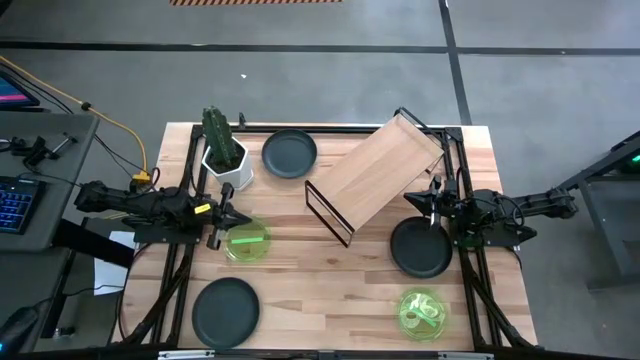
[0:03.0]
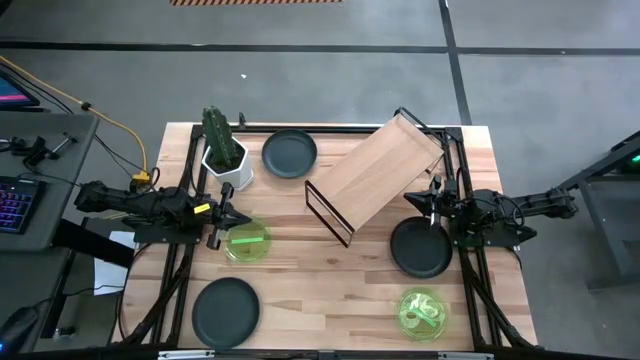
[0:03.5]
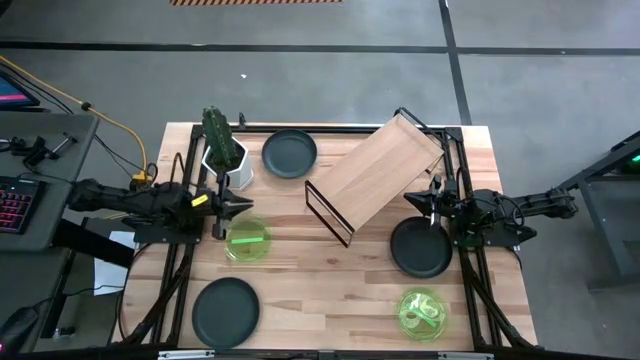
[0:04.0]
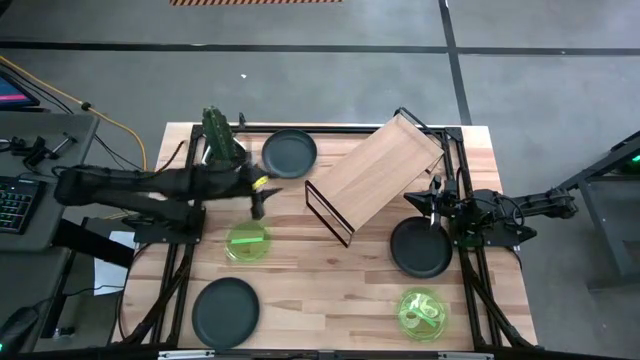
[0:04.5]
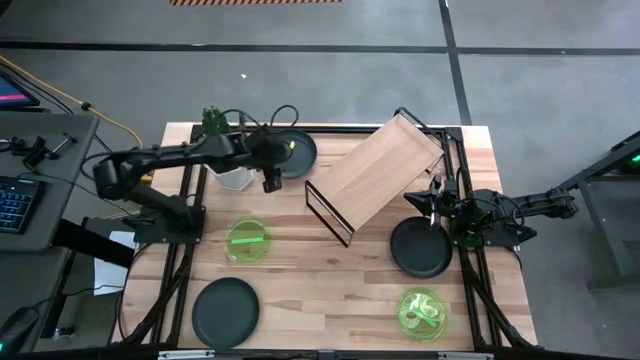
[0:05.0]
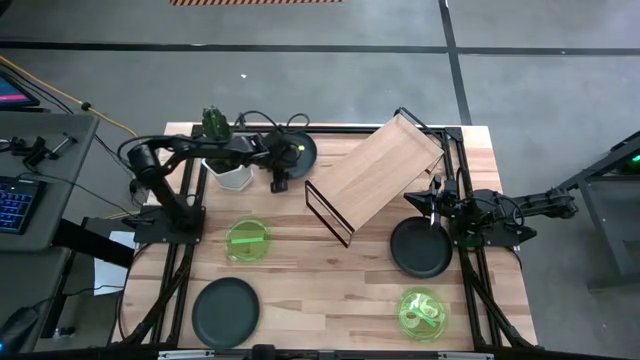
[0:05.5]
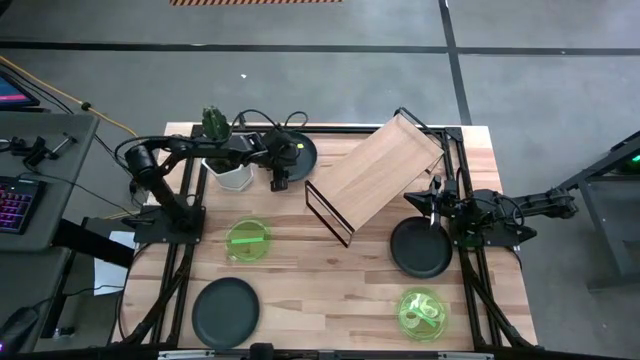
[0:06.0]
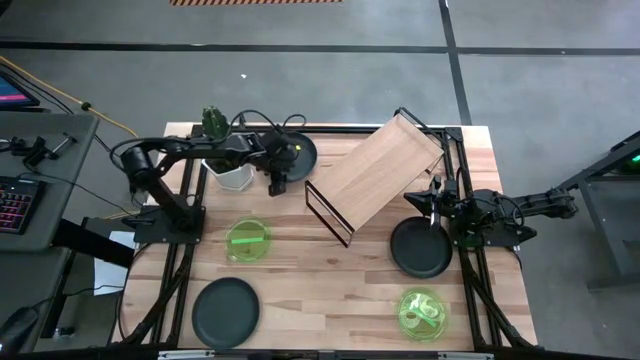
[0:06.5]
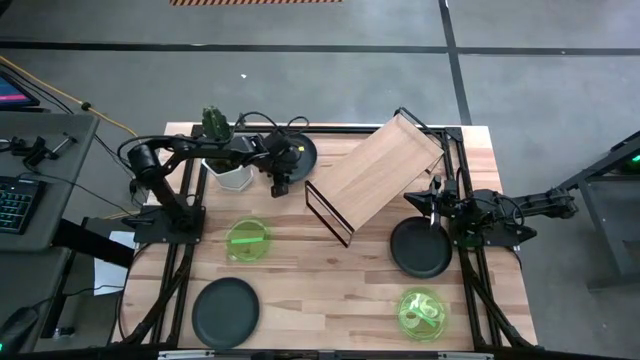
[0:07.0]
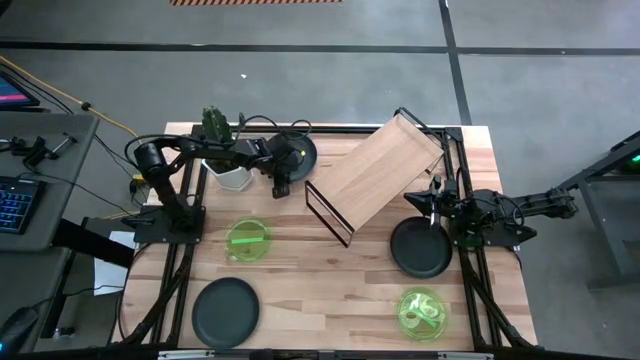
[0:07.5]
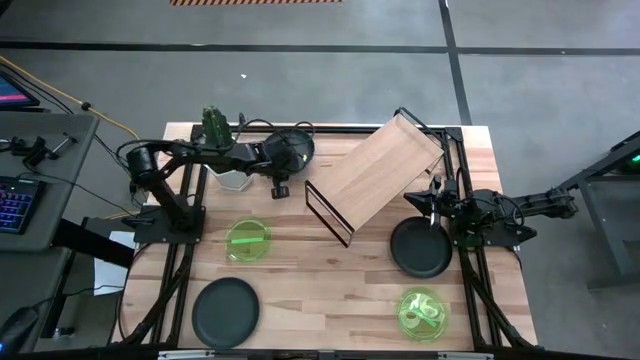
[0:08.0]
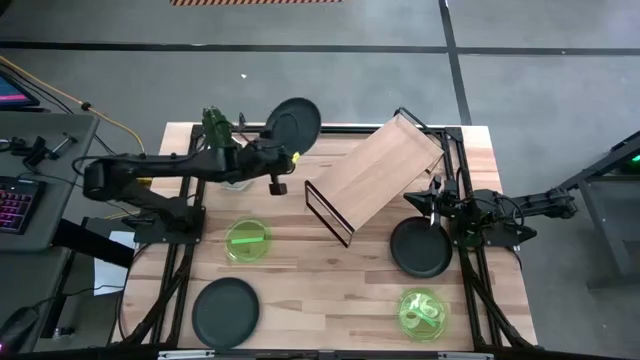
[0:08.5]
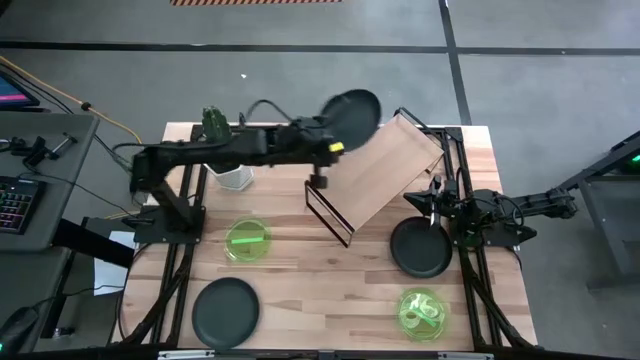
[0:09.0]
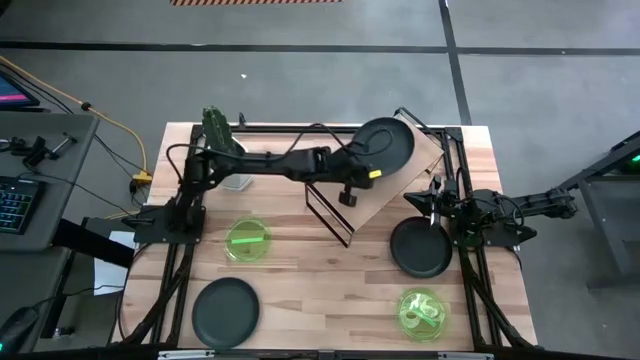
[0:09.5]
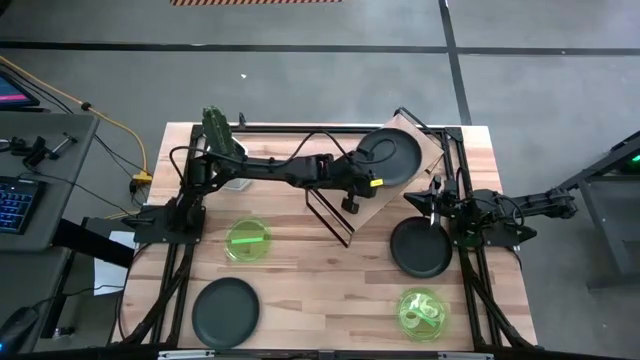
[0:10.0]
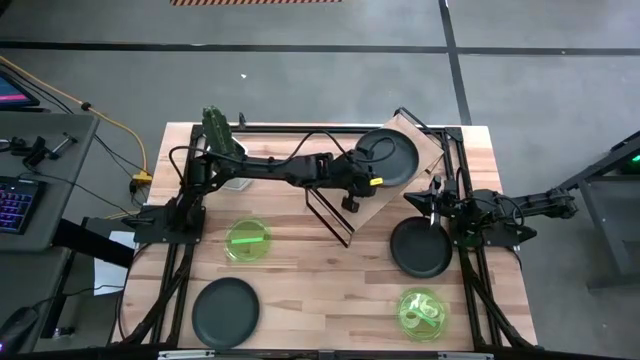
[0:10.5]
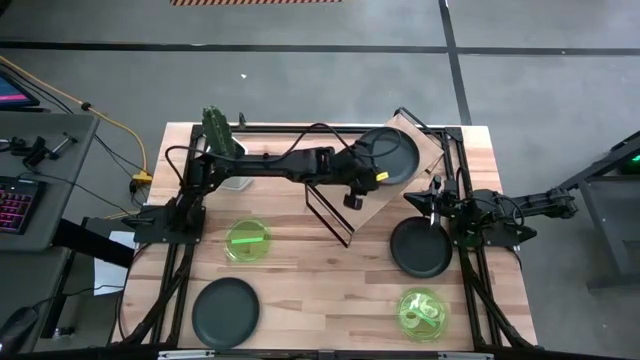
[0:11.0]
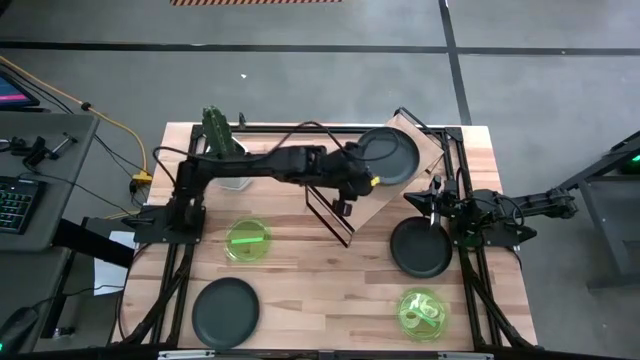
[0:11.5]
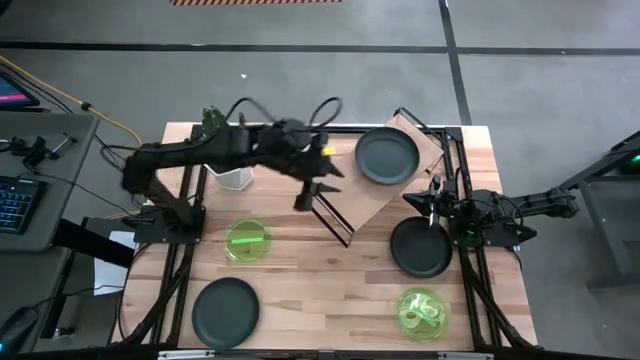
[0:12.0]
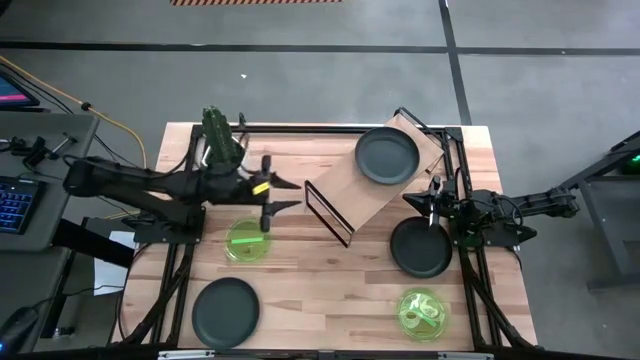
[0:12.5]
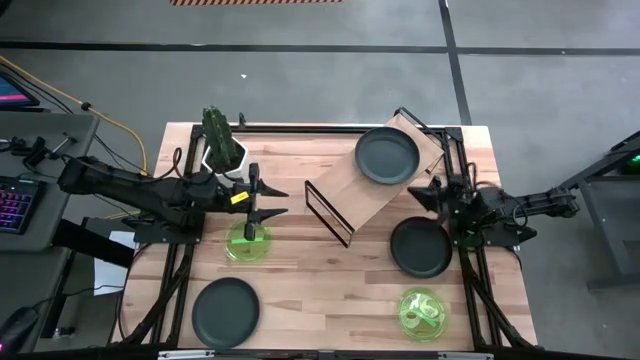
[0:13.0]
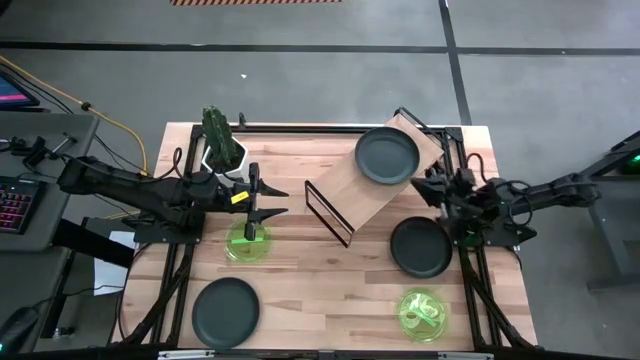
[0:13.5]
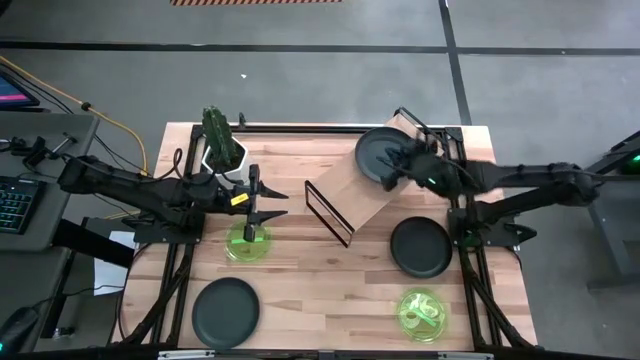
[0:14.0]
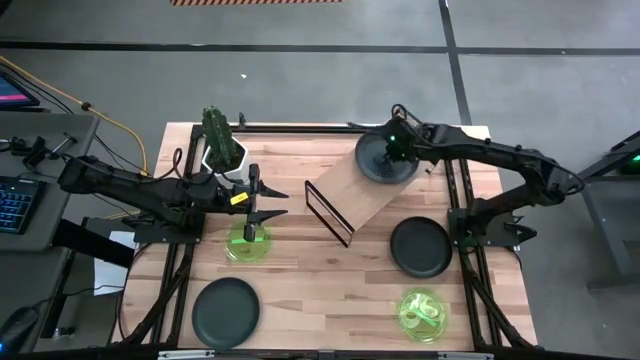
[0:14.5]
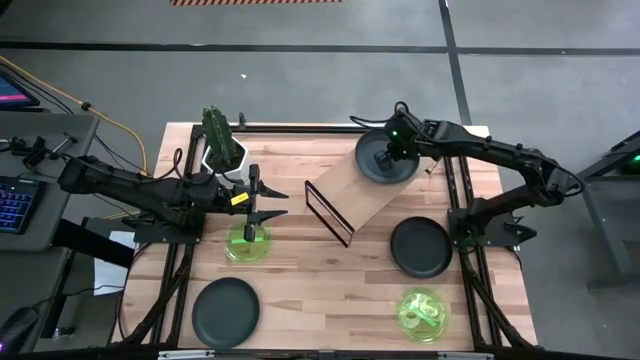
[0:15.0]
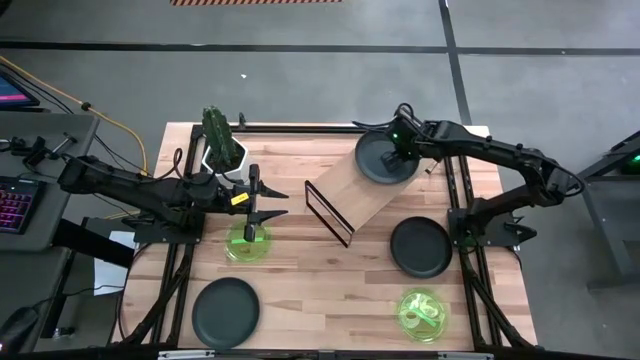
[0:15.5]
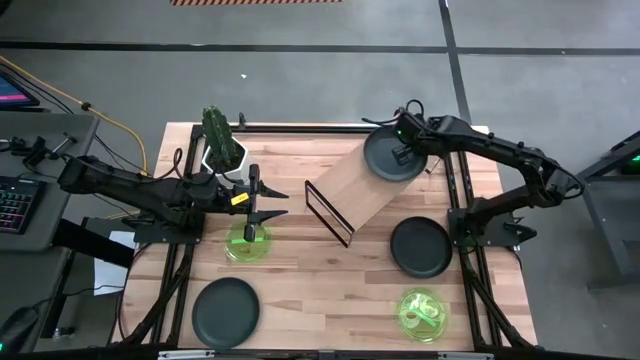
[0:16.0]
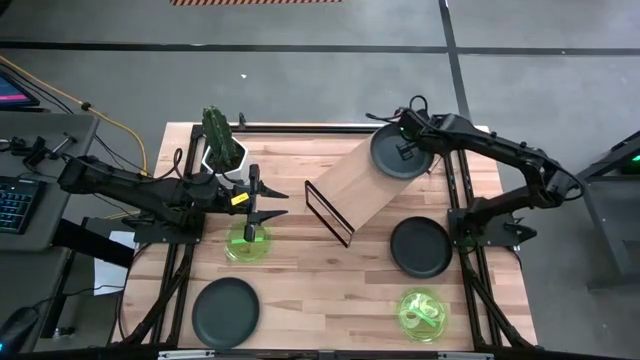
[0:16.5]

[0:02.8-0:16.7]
Task: Place and stack plates onto a shelf
Put the top black plate on the shelf

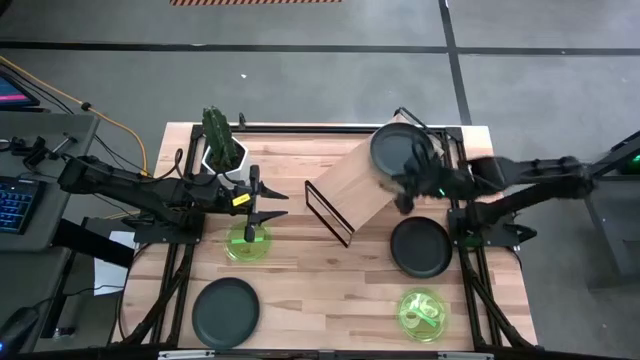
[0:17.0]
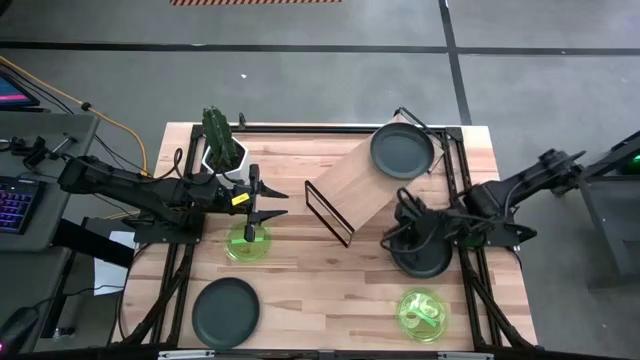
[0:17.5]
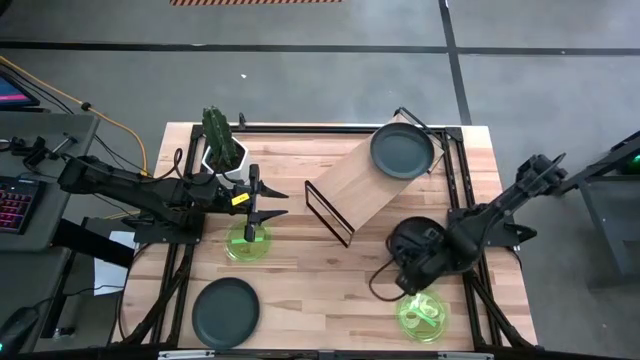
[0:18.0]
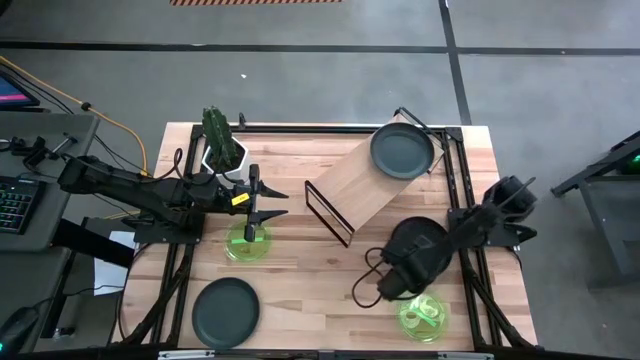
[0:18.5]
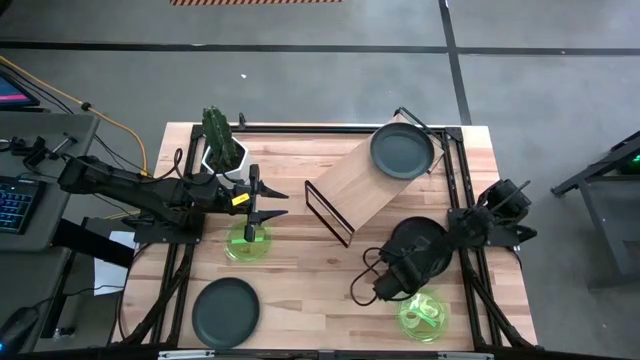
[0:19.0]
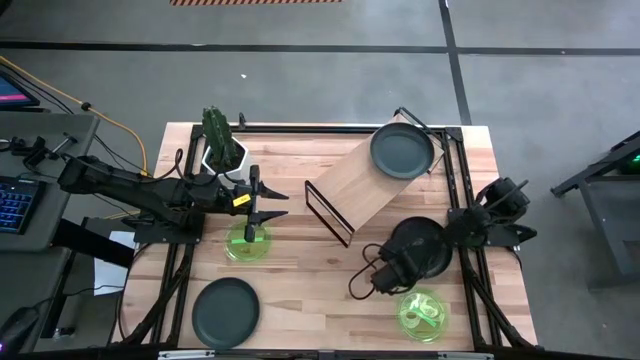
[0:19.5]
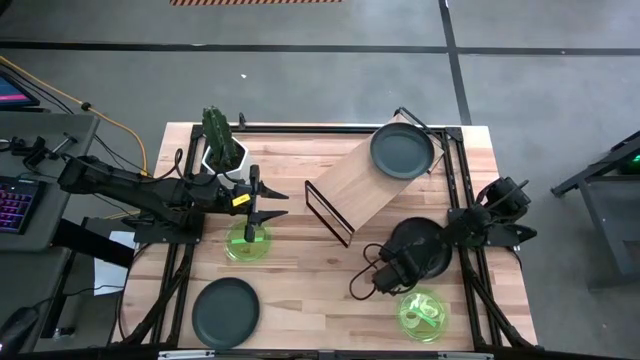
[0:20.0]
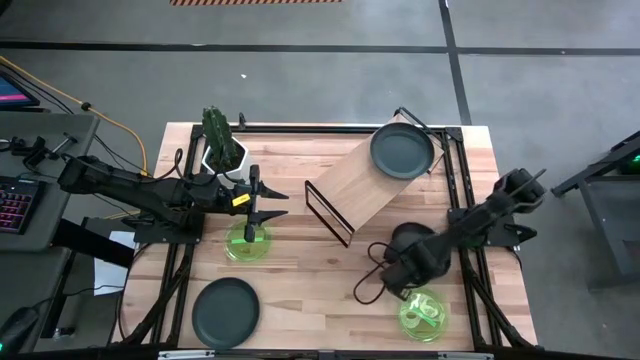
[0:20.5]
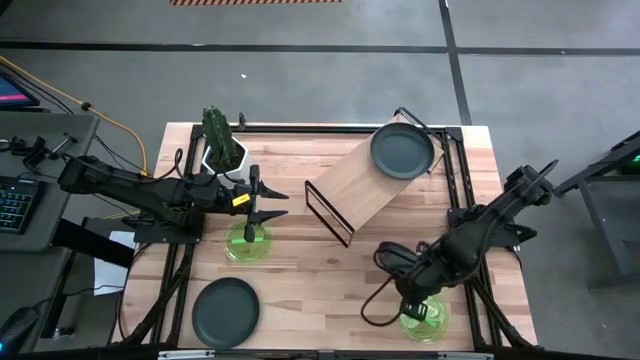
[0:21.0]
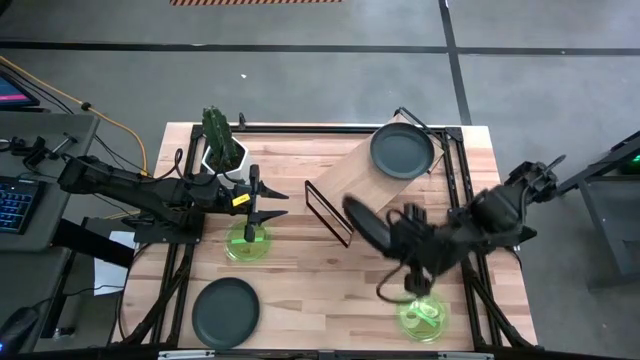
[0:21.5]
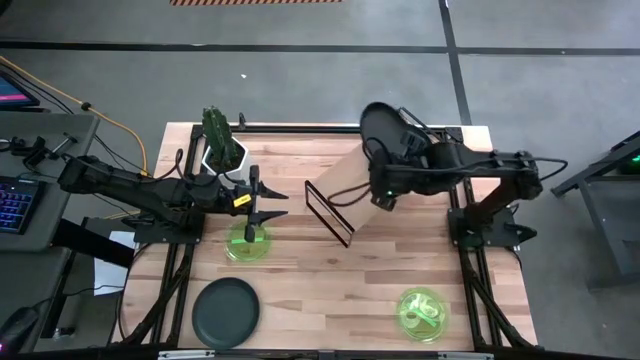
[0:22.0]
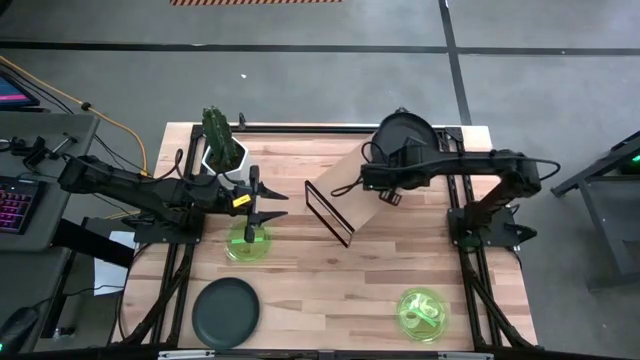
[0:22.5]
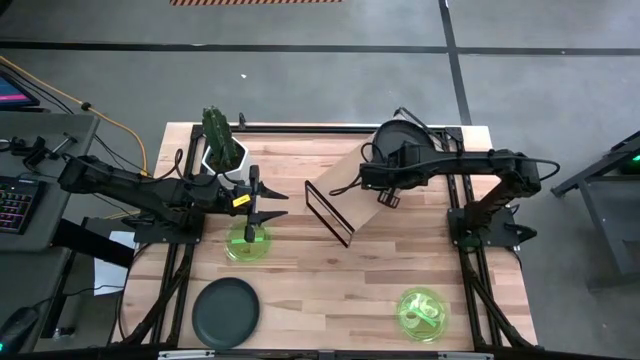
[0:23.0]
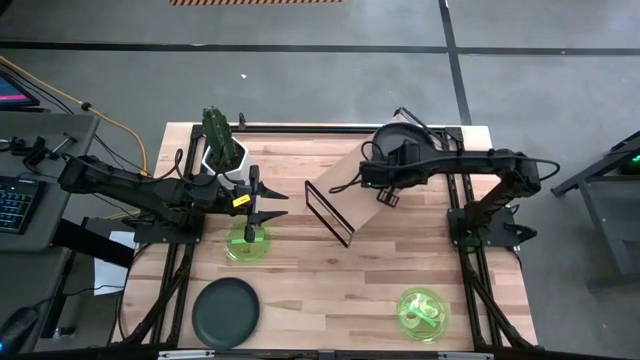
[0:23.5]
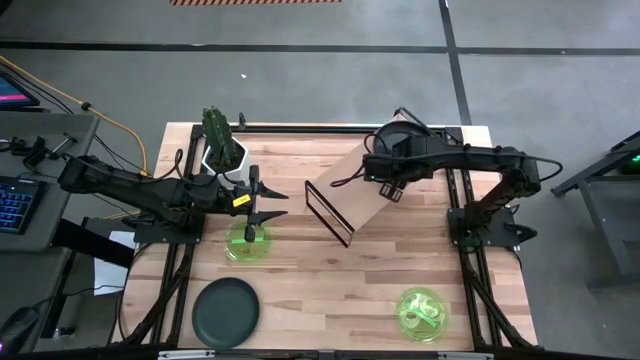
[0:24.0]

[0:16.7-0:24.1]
Stack the right black plate on top of the black plate on the shelf
